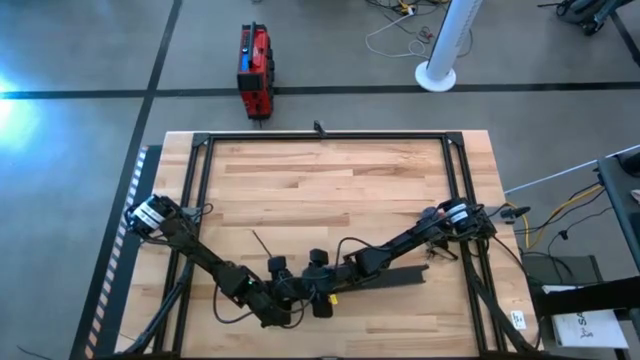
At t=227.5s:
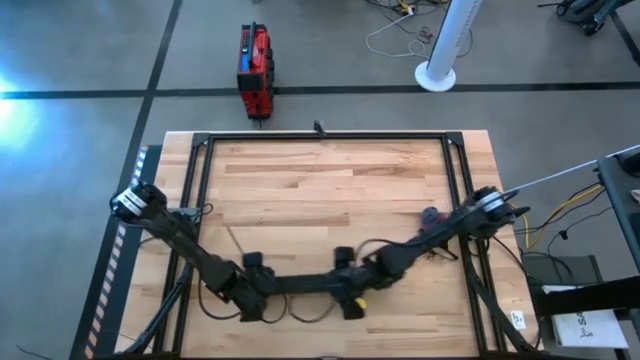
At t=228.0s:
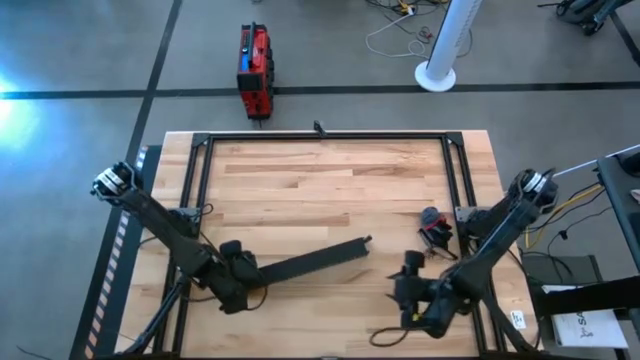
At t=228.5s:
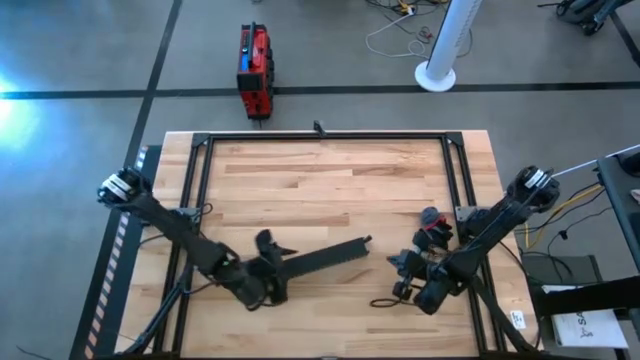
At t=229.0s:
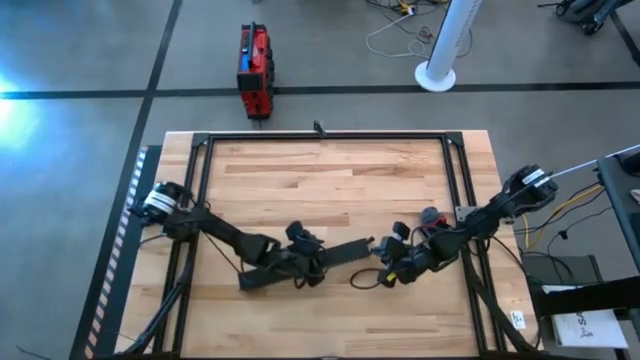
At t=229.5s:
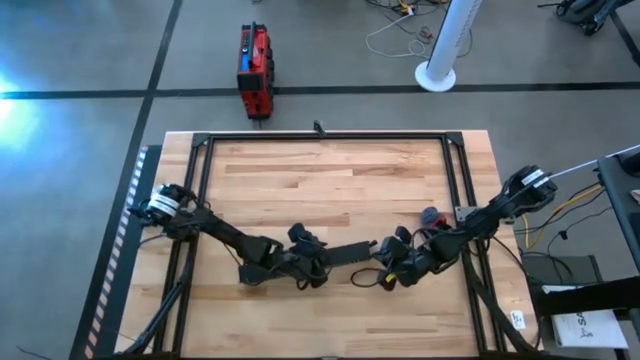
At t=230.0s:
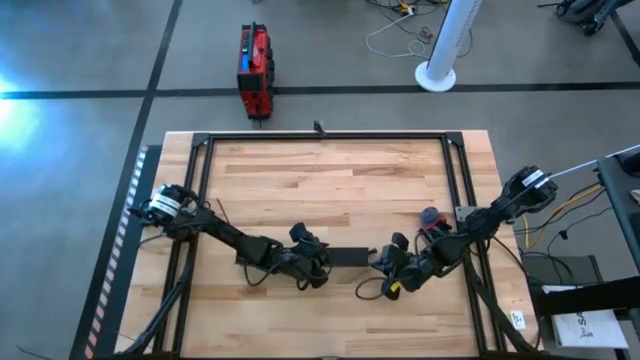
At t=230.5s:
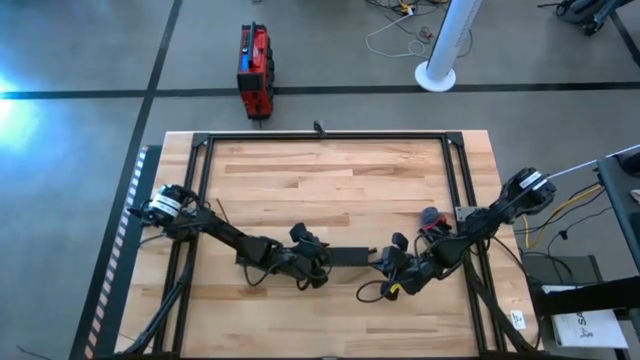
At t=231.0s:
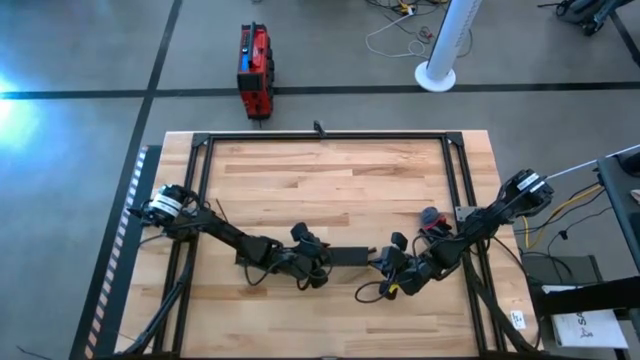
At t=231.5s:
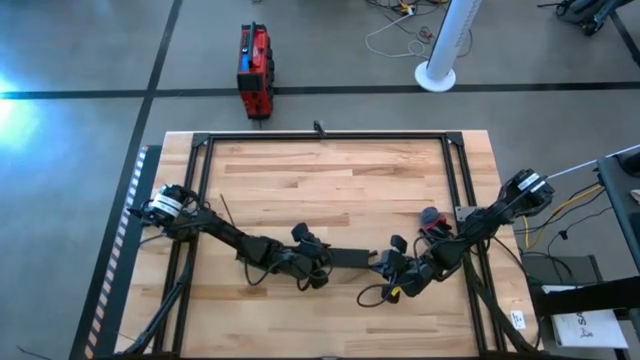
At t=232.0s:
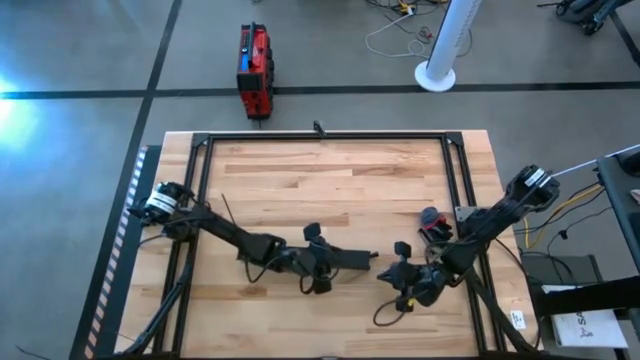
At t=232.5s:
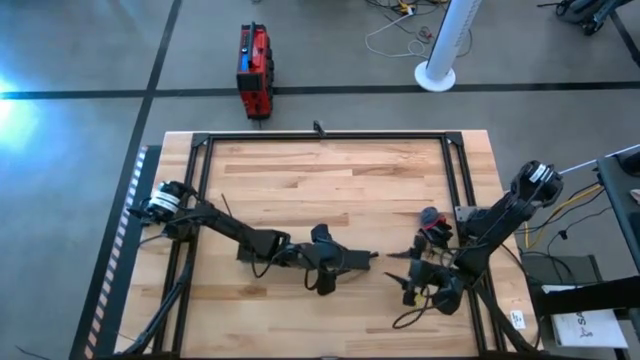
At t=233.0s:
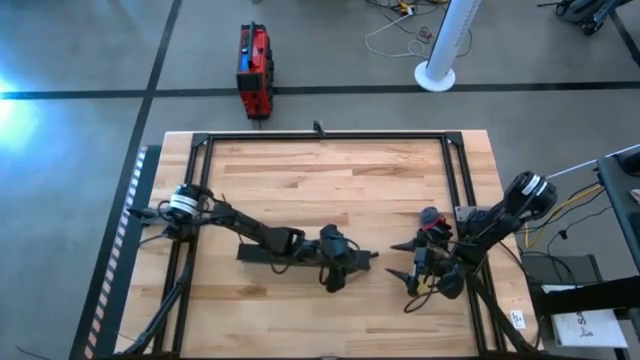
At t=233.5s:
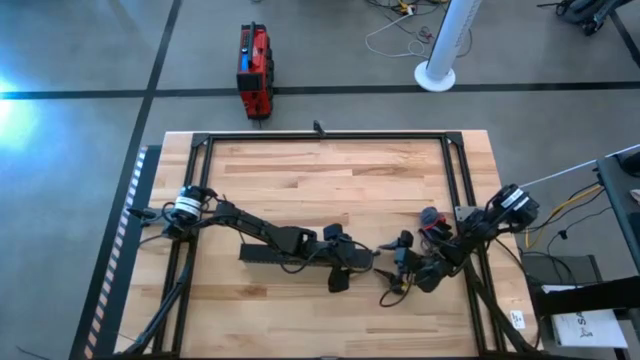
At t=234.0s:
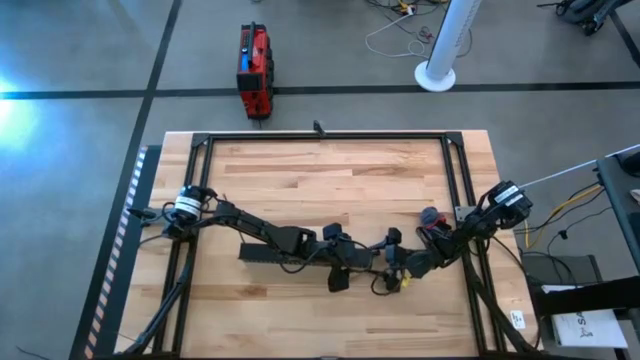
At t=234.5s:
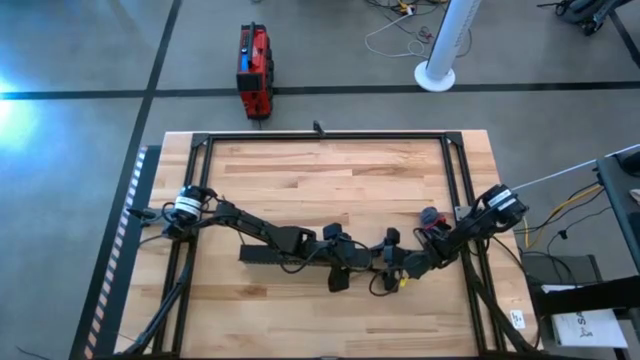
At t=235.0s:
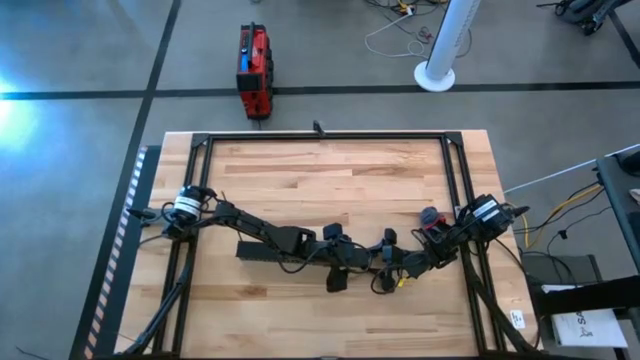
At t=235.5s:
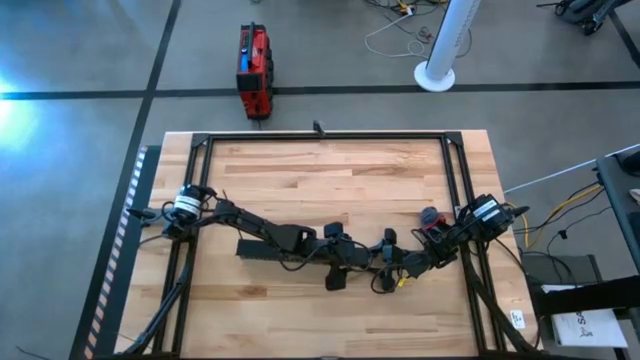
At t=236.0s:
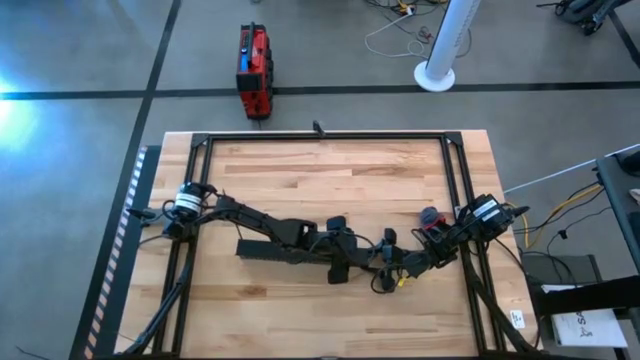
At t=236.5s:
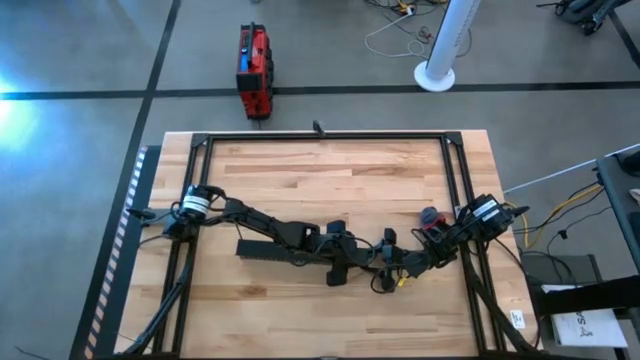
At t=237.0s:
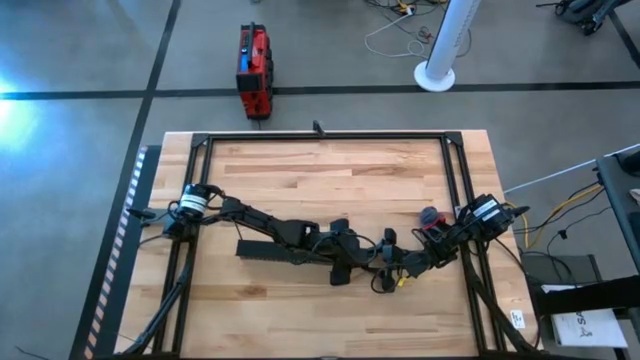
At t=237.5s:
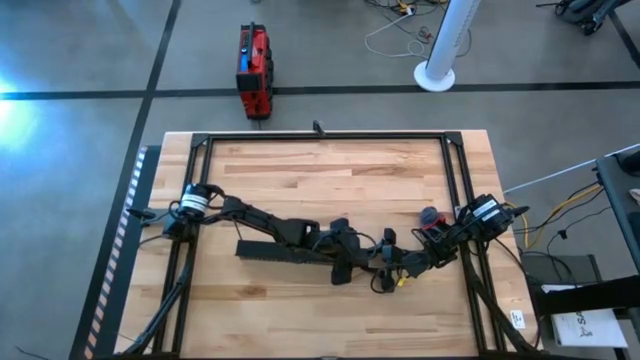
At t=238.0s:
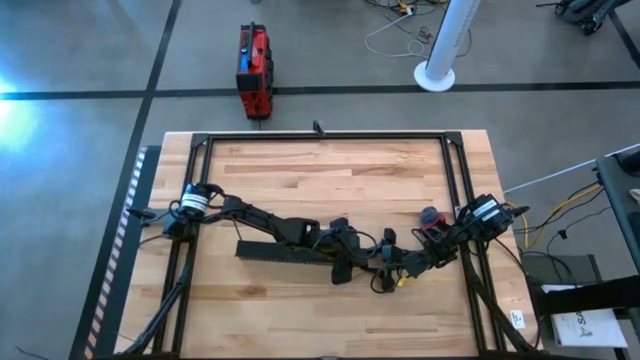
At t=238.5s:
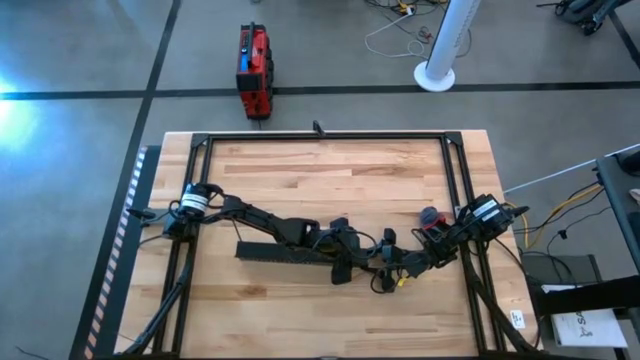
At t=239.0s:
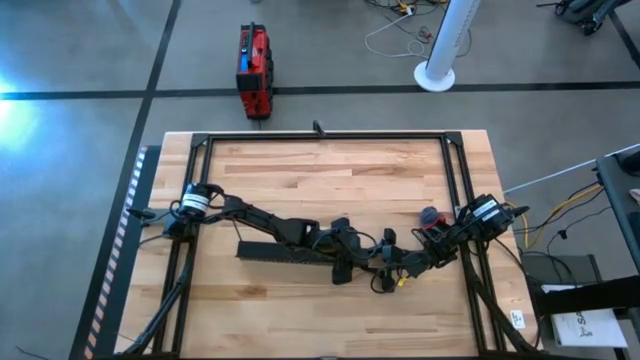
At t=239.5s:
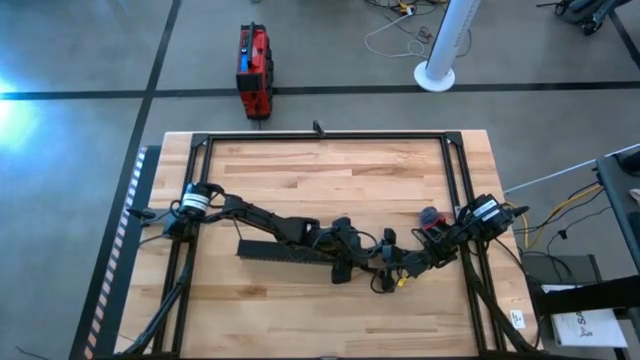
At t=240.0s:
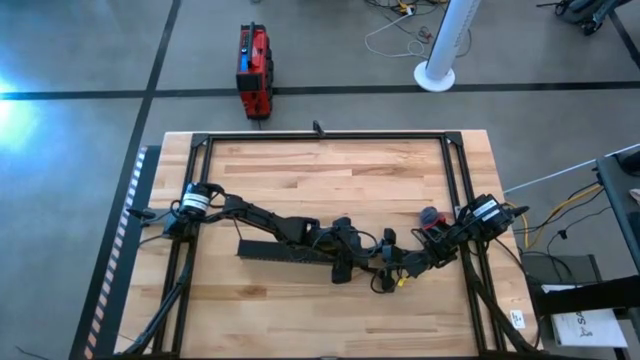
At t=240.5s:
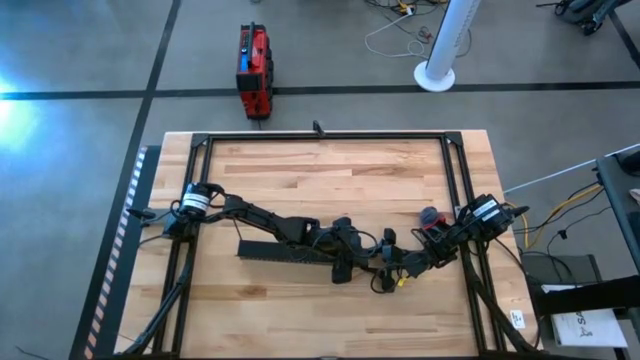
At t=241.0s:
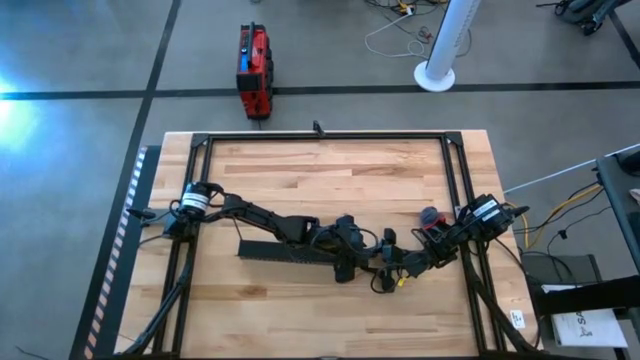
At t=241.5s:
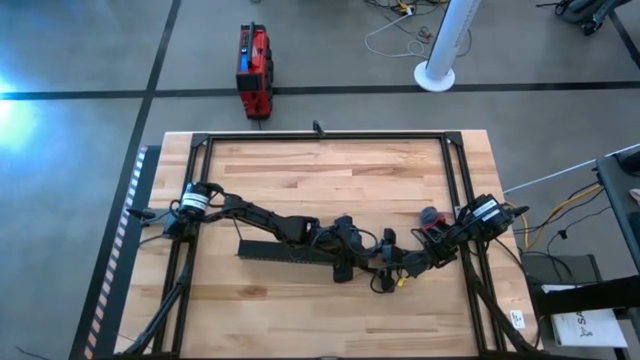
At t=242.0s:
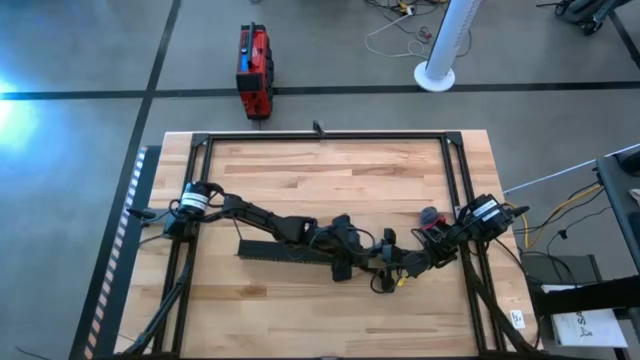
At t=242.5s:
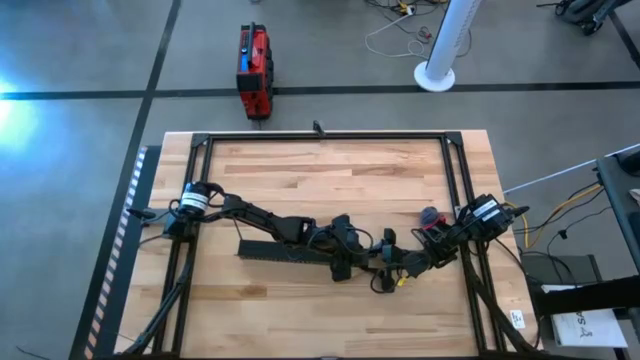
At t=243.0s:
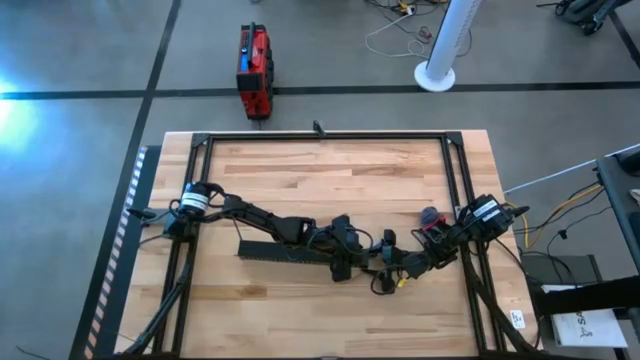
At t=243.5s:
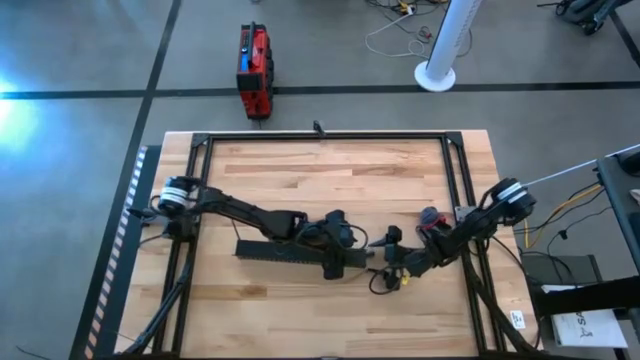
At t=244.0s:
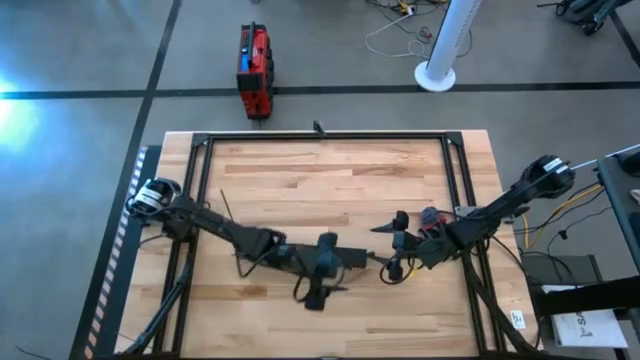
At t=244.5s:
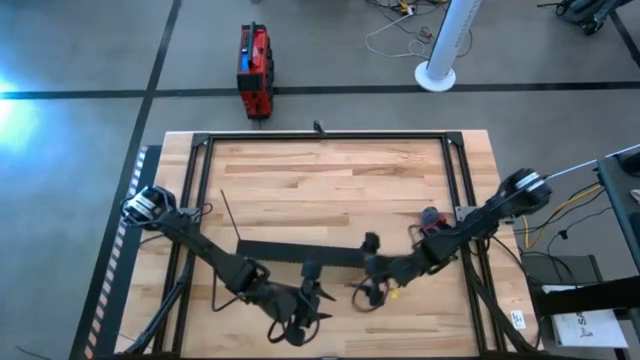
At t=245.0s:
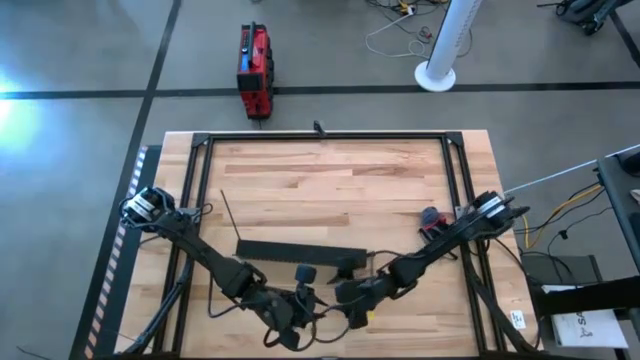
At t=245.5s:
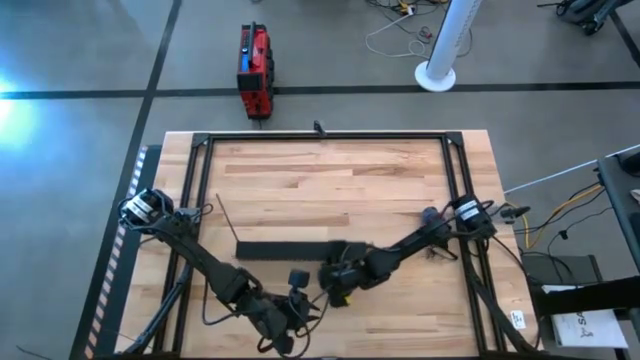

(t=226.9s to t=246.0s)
Task: Ziptie cables
Close the cable duct using the cable lid

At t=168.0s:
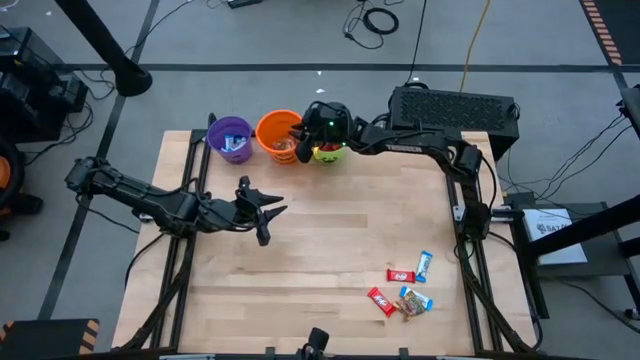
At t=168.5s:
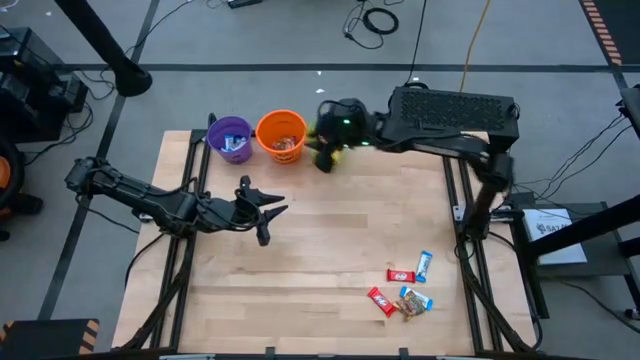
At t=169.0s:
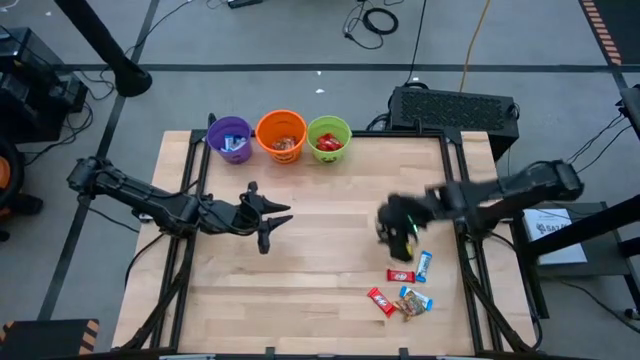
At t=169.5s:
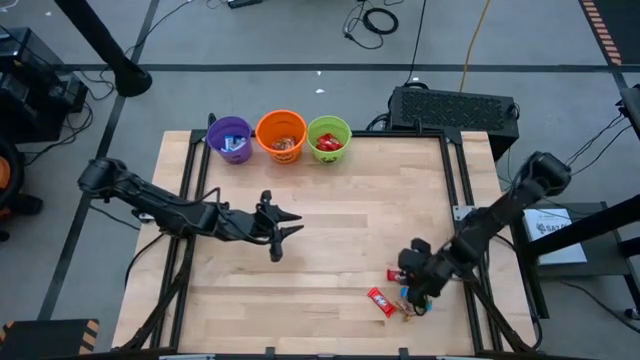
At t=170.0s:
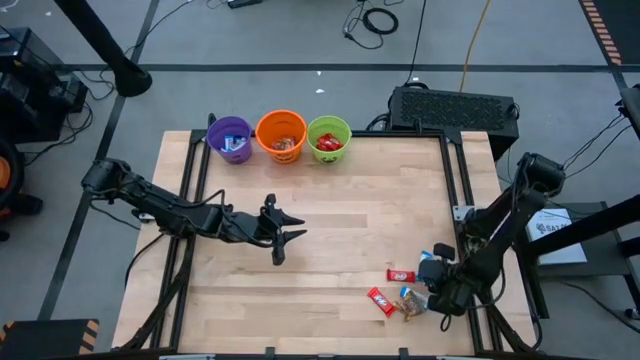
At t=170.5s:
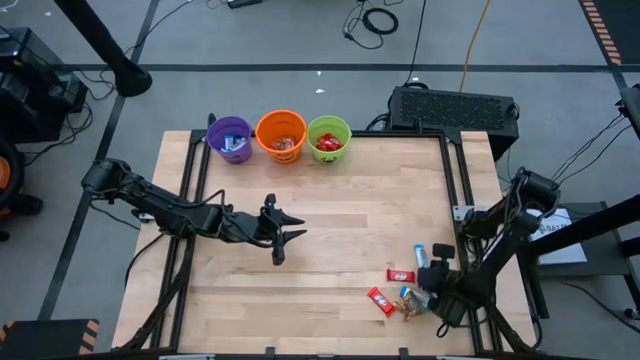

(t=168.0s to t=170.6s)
Task: Sort candy by brand, put in halloween buckets
Put the white chocolate bar into the violet bucket
